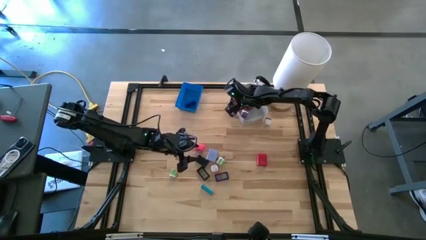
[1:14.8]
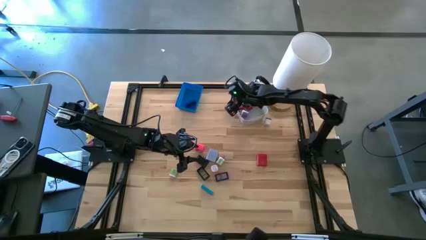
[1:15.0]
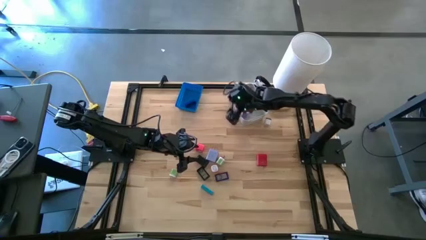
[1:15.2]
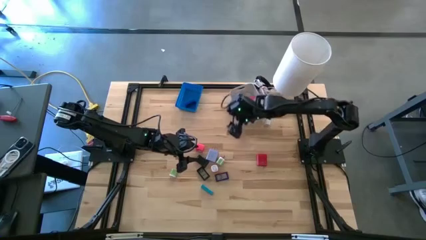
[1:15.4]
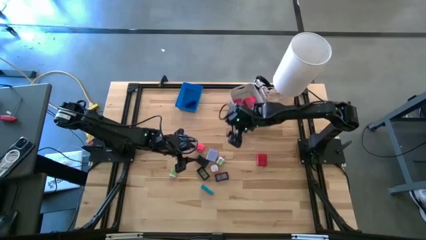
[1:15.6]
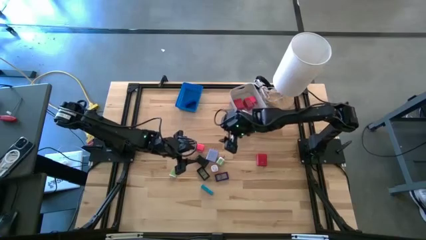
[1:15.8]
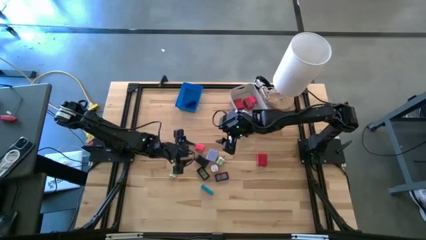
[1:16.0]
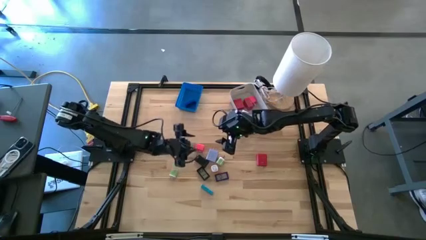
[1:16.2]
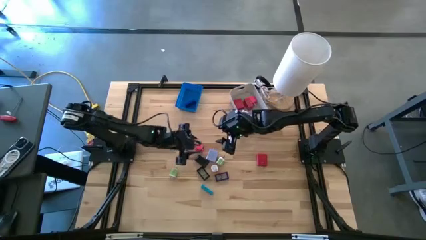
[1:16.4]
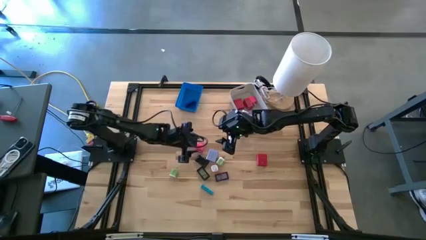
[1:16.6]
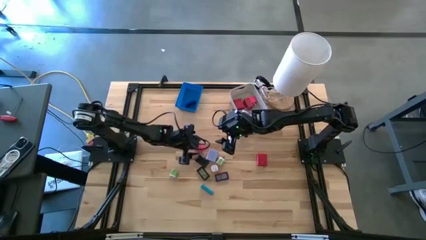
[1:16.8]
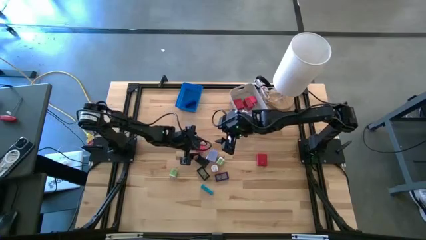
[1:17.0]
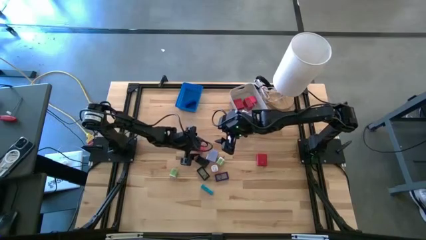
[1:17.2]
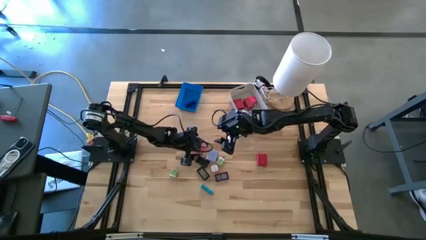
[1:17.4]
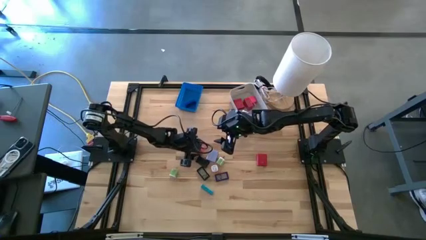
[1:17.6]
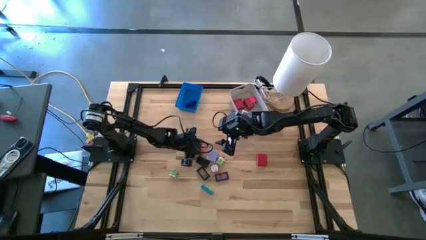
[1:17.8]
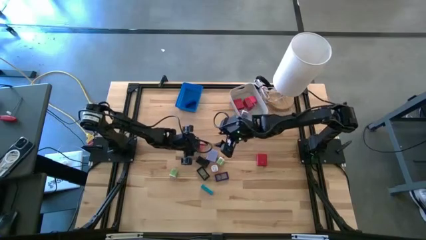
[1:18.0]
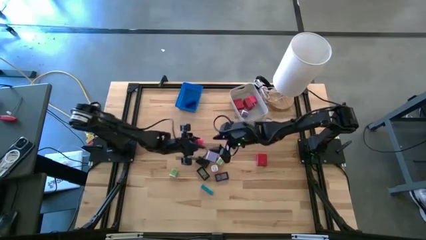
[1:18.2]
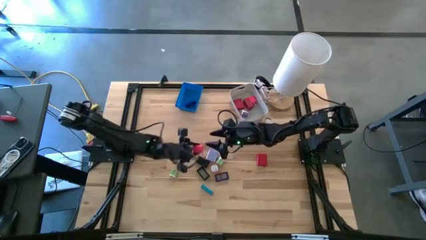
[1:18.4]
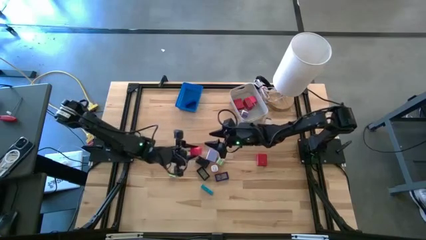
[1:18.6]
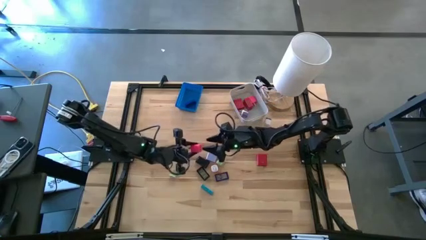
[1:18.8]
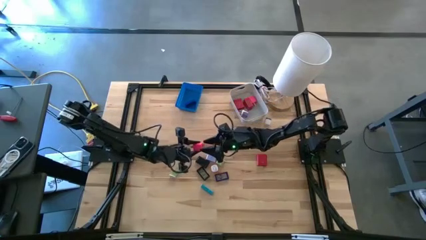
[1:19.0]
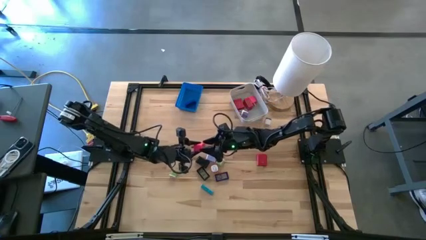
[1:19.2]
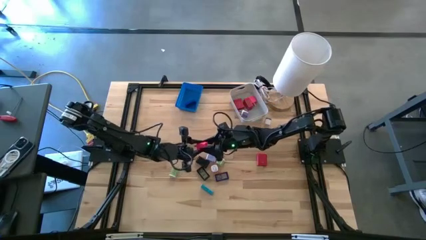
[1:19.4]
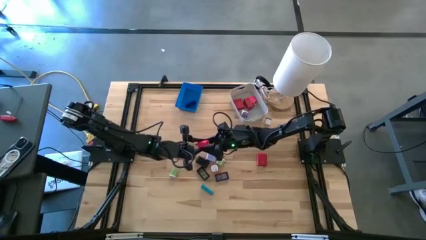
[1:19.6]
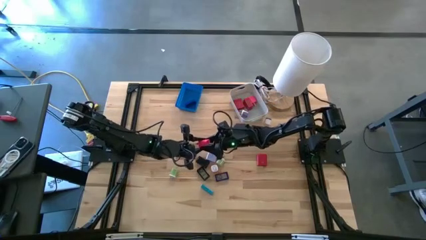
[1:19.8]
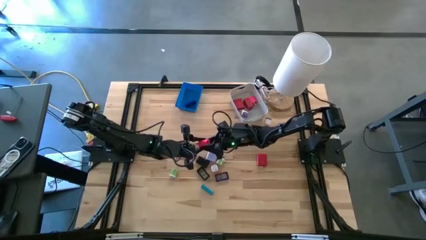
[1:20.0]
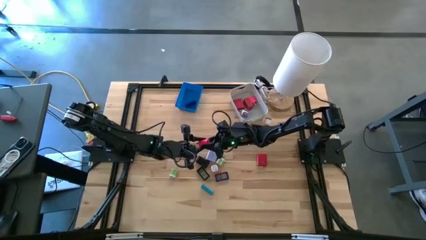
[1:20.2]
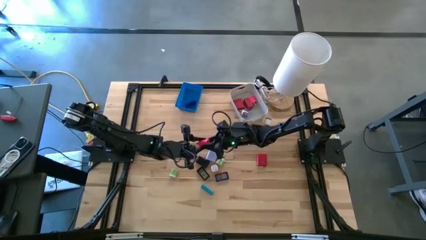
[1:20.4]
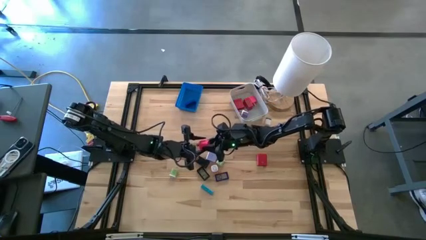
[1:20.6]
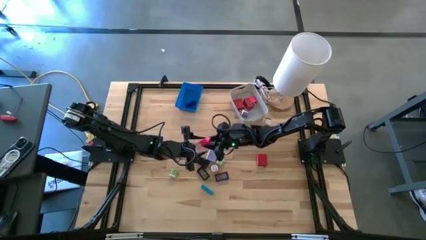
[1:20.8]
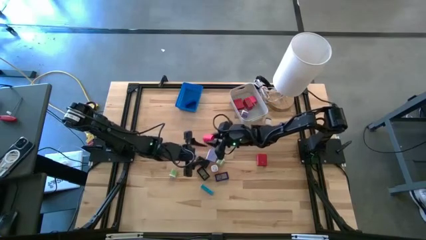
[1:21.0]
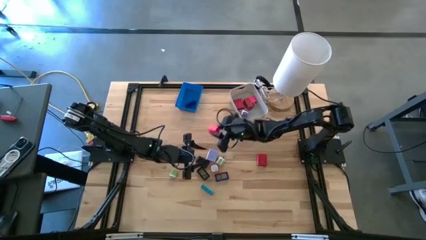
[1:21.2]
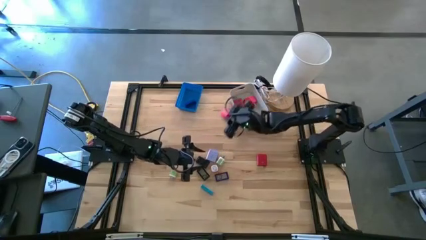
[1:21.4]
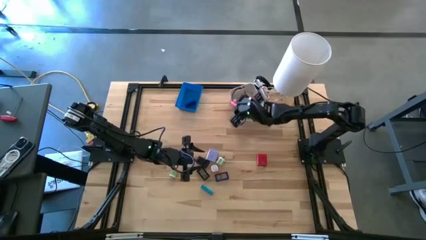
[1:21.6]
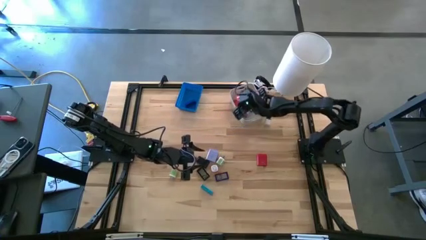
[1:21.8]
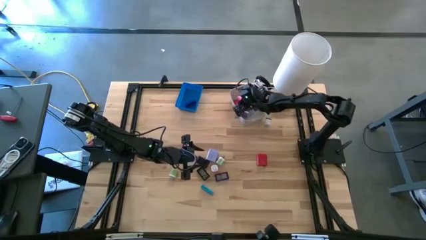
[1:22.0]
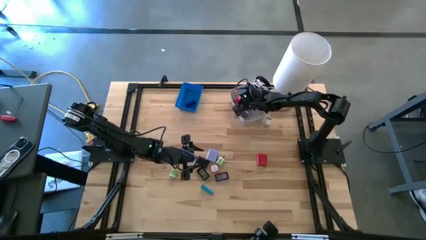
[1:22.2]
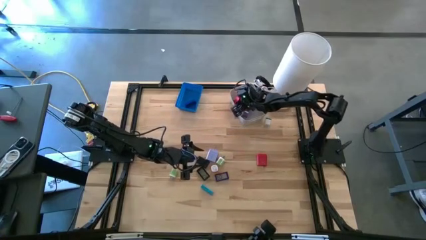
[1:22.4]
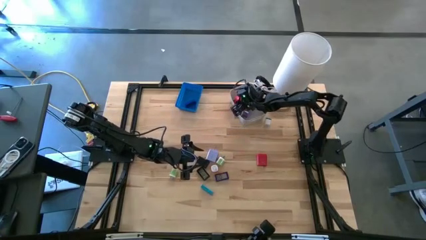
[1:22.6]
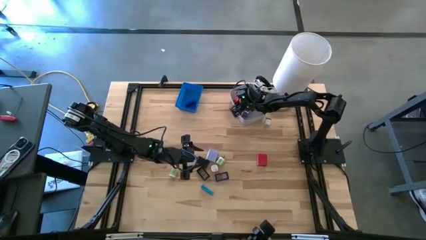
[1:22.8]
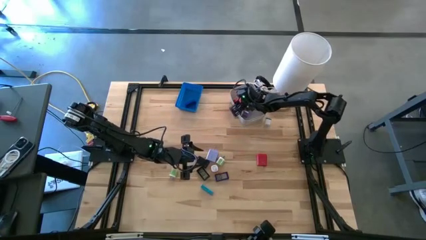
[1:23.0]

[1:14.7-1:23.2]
Task: Pick & Place Office items
Put the pink charger adapter into the white bin

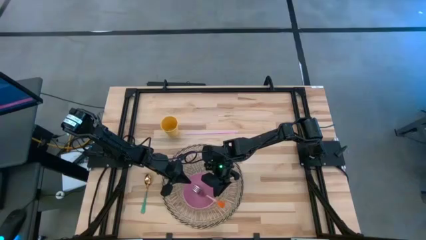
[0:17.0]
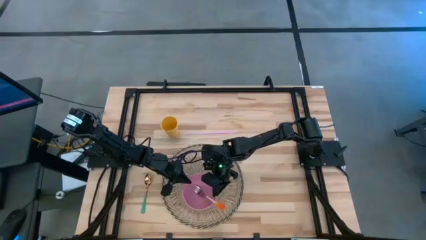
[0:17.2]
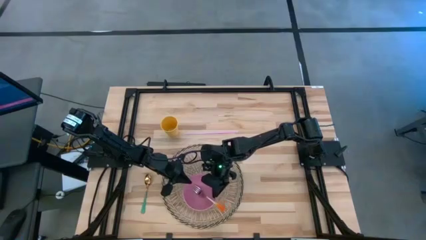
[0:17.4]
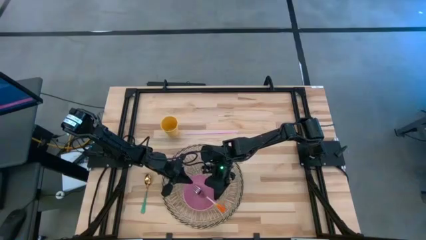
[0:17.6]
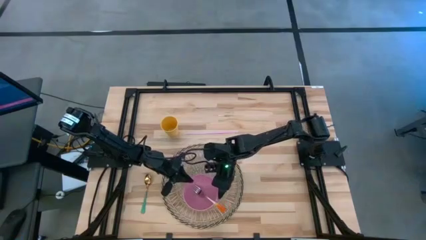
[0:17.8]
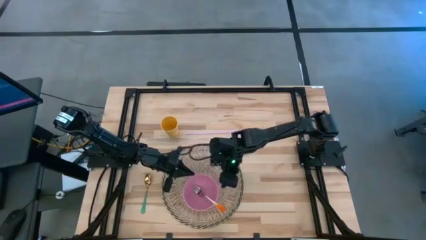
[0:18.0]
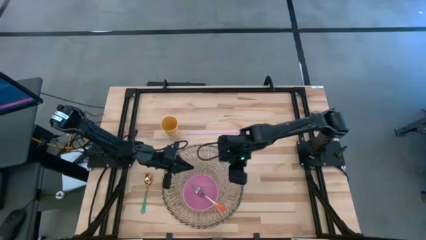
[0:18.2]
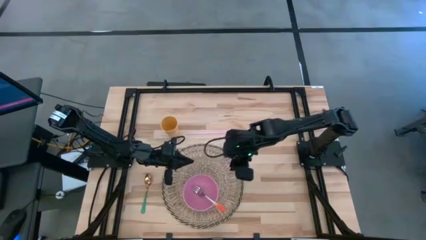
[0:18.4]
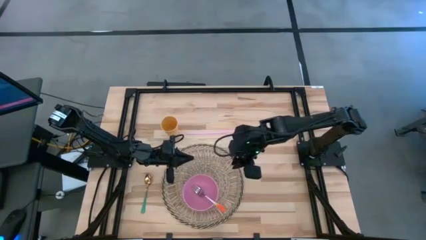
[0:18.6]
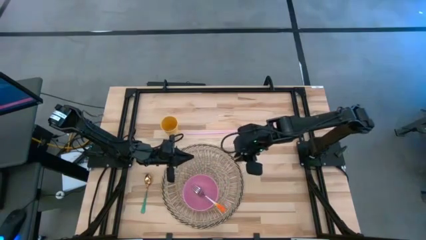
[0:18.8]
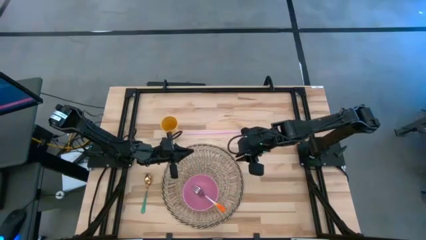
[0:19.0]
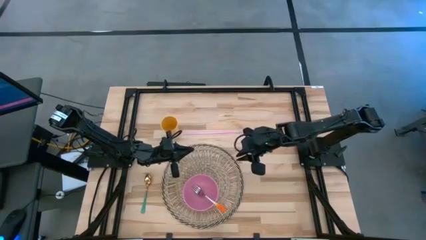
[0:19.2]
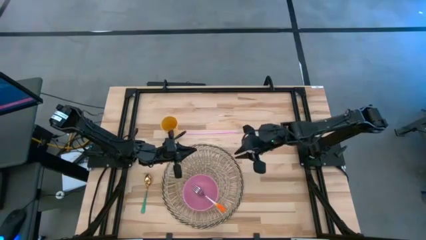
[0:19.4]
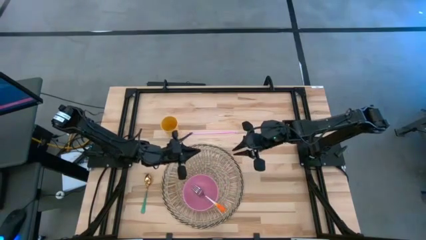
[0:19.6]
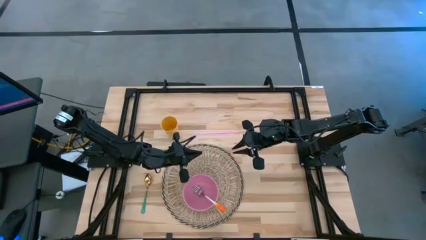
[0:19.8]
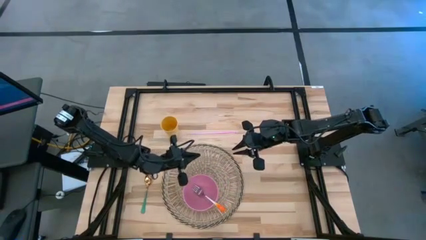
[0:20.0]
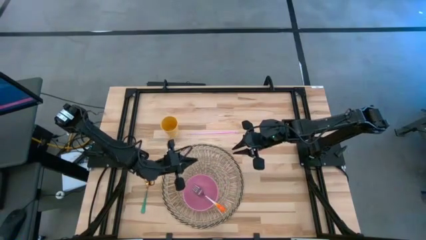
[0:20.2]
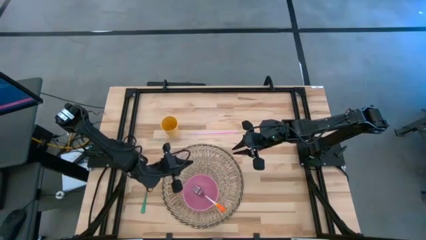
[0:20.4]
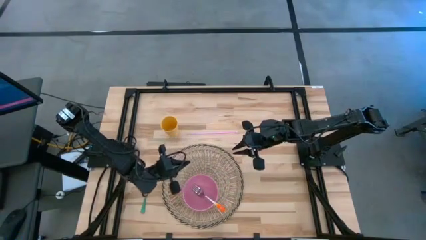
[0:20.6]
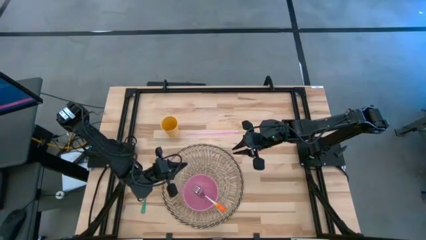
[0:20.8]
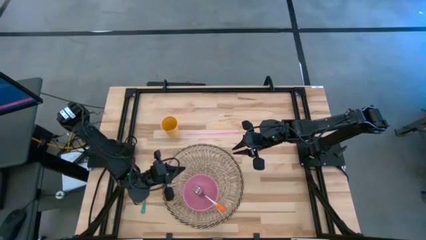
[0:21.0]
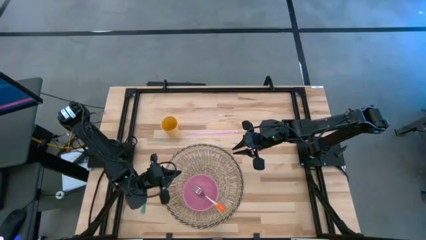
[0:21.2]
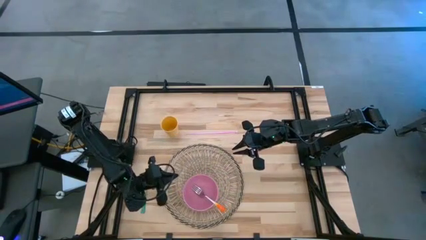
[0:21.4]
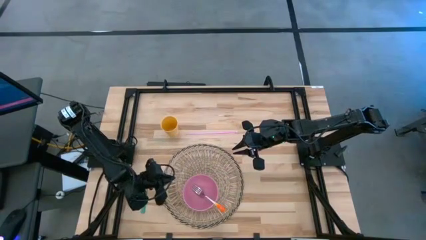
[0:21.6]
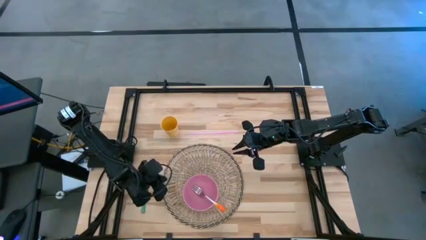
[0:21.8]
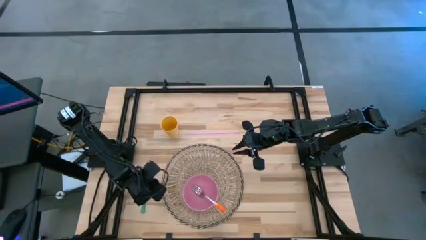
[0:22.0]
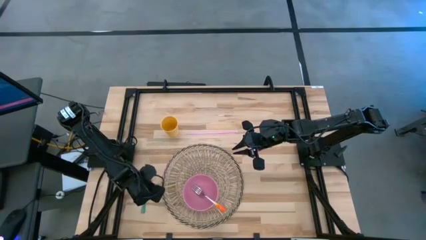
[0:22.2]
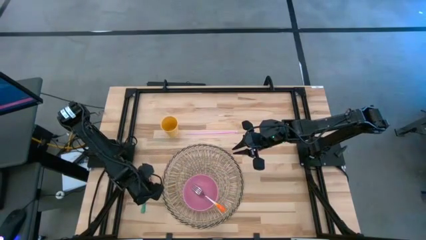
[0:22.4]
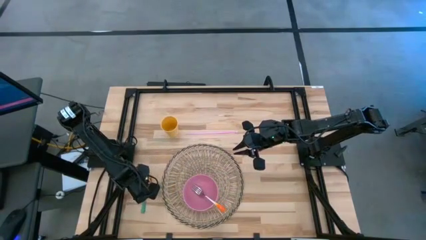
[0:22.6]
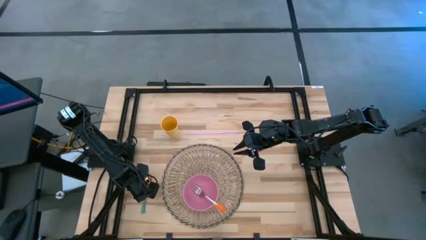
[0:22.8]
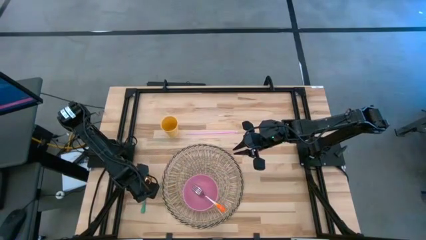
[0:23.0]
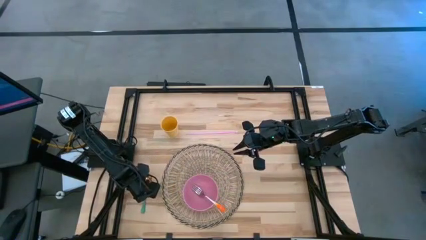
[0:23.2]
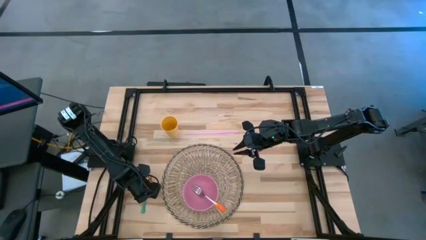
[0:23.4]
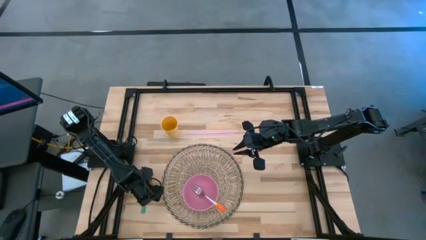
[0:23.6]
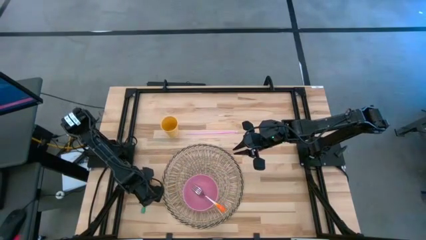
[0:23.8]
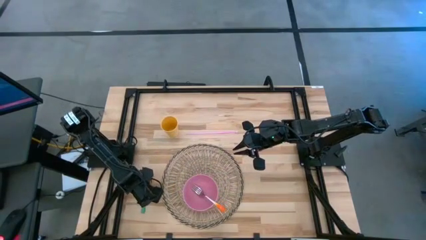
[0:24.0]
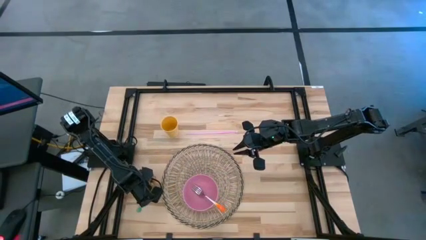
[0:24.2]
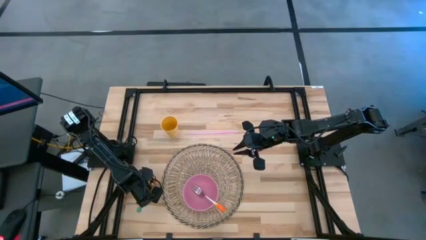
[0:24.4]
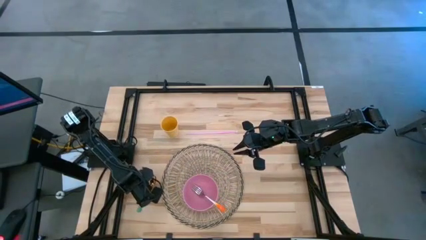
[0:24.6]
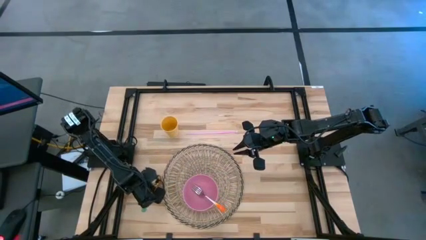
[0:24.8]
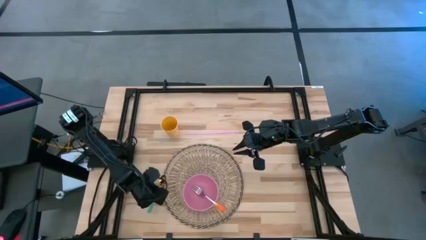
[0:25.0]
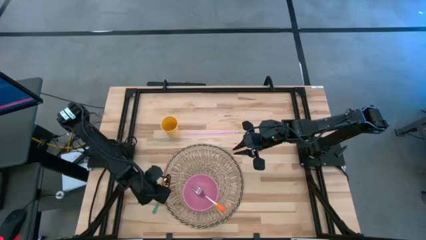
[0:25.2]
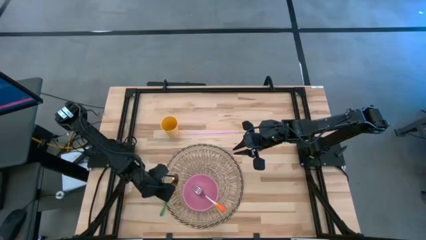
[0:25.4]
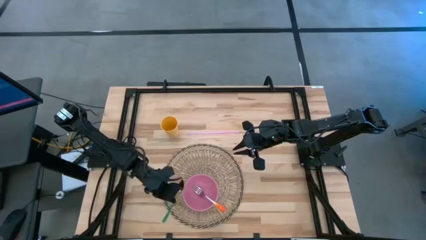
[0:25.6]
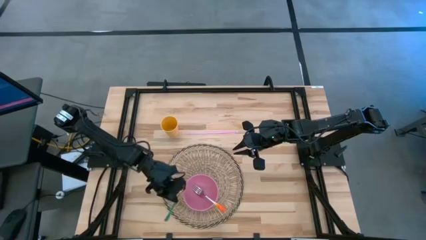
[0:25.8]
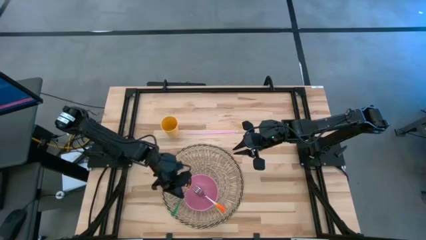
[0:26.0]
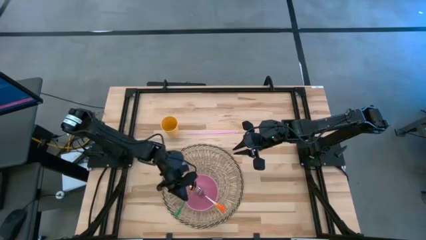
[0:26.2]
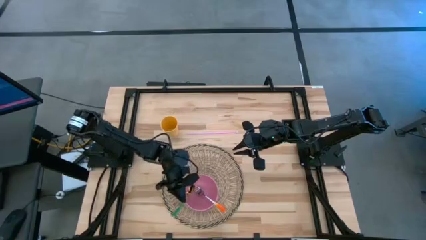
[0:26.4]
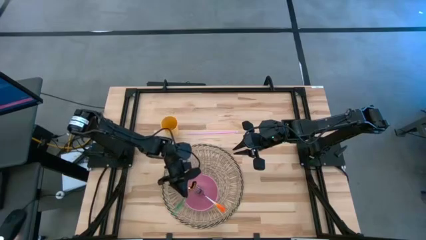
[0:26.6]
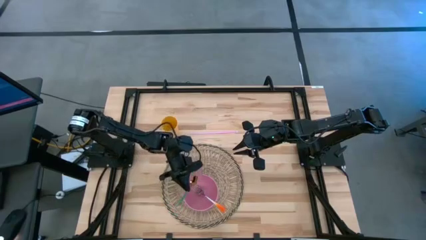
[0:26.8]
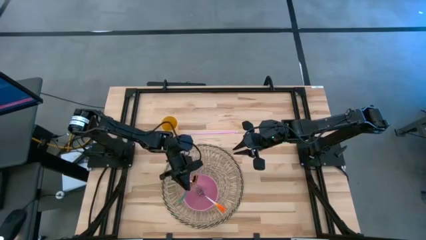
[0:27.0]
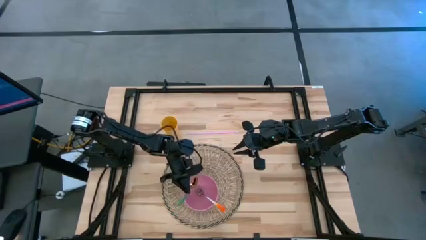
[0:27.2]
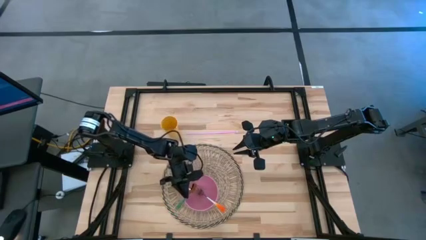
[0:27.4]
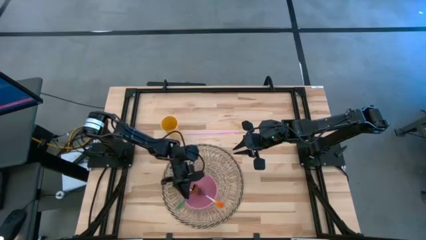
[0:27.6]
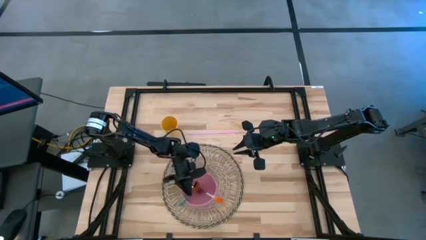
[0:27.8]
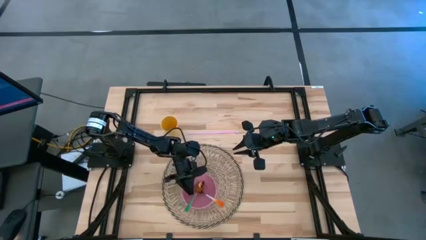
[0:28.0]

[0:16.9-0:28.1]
Task: Pick & Place Utensil
Put the green spoon into the pink bowl
